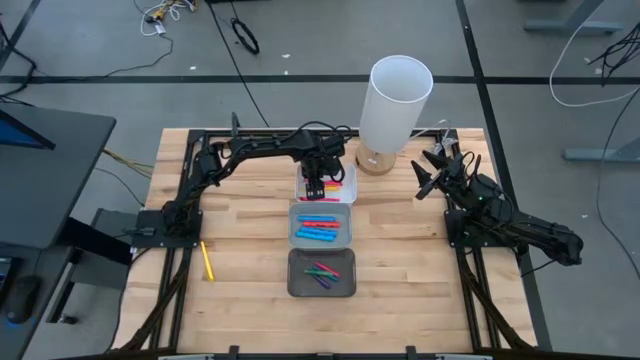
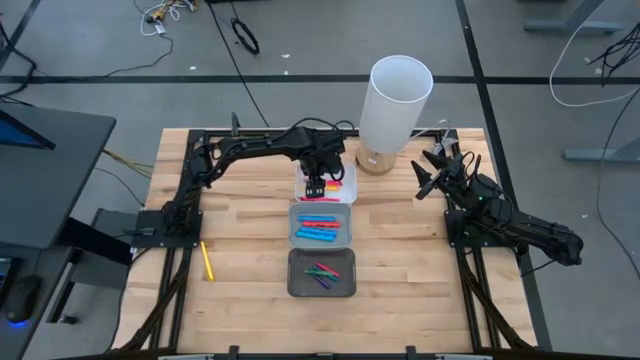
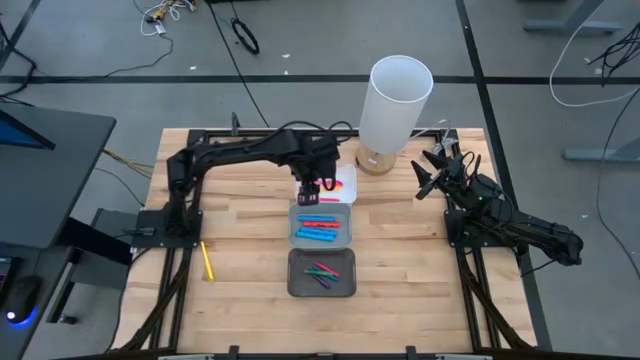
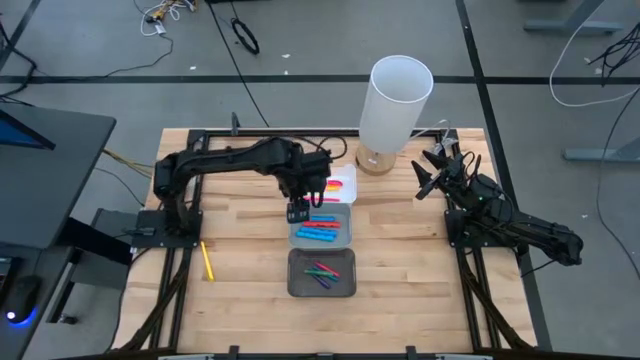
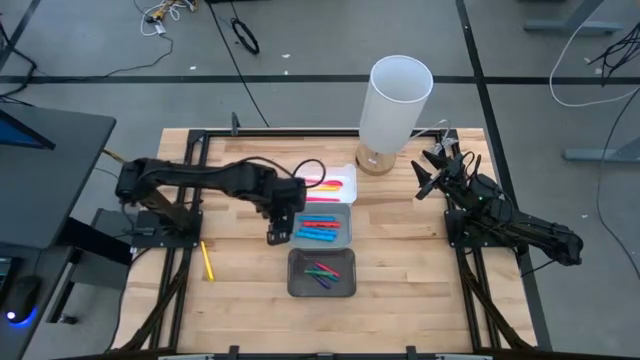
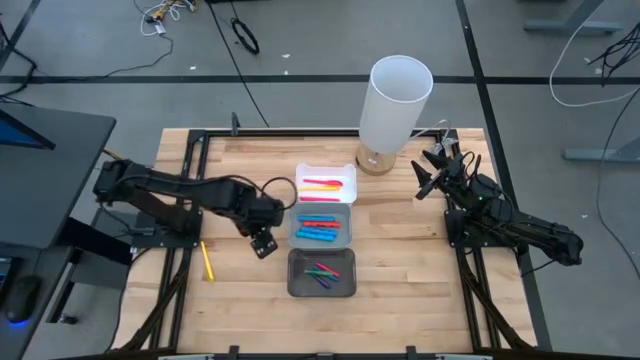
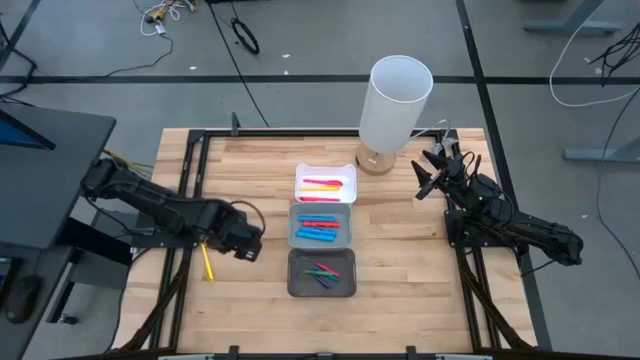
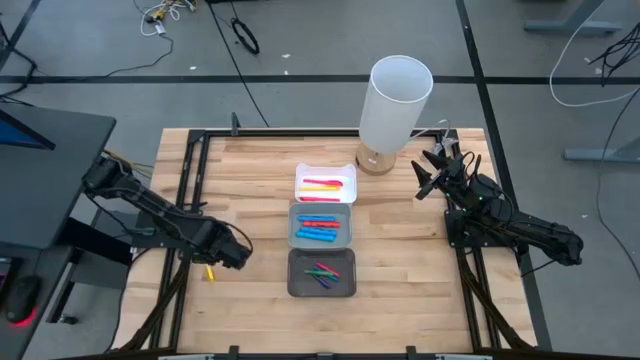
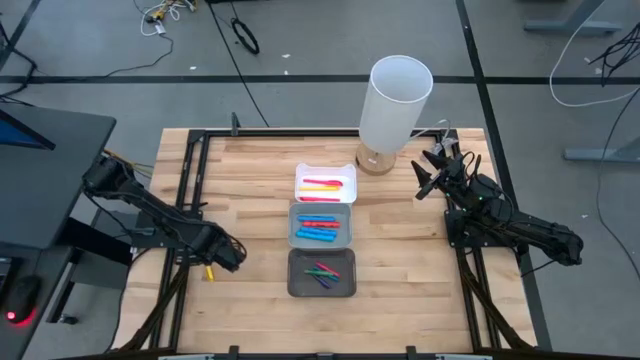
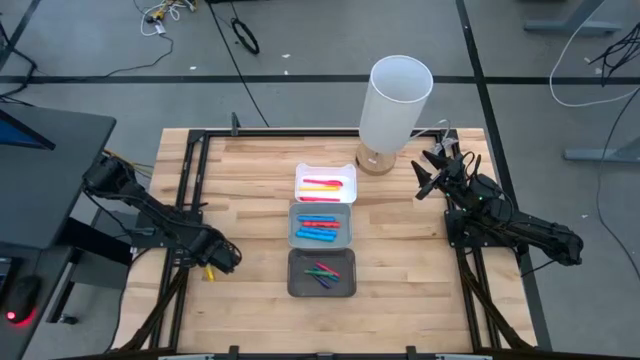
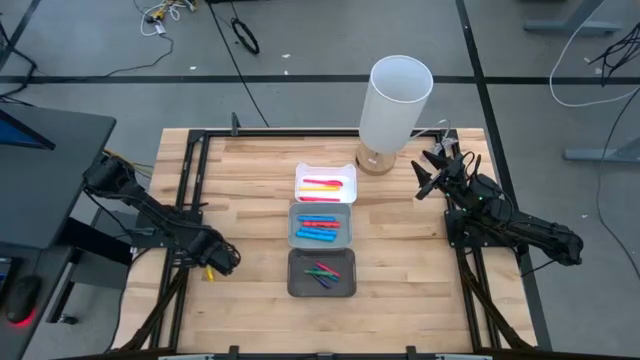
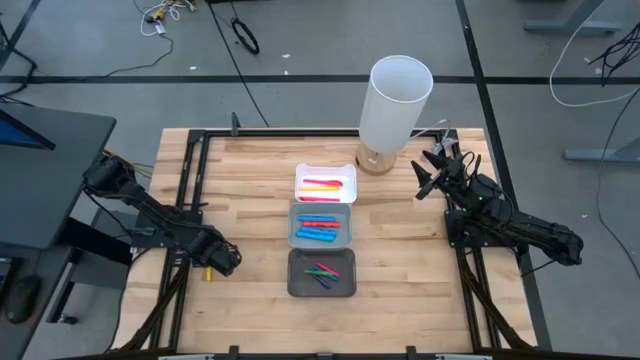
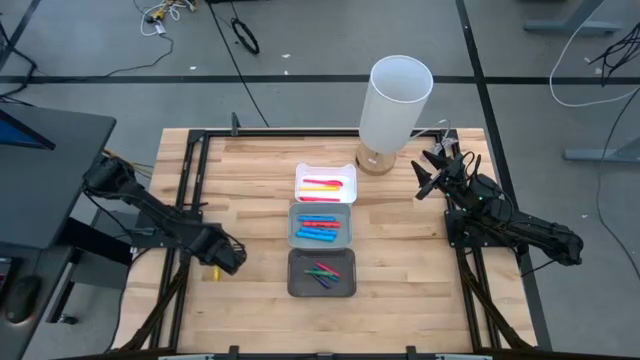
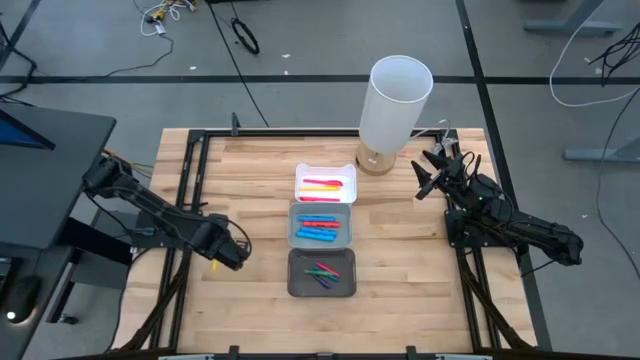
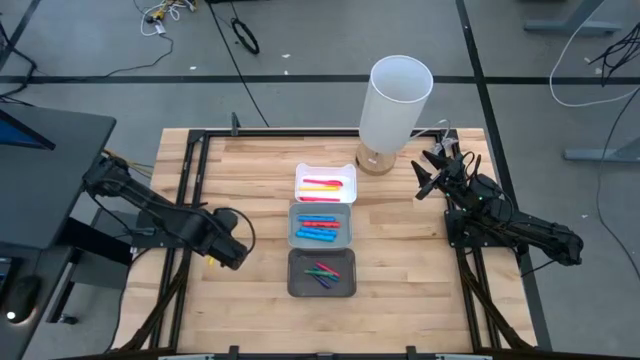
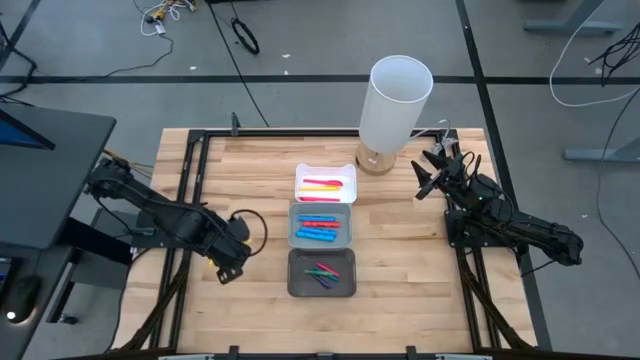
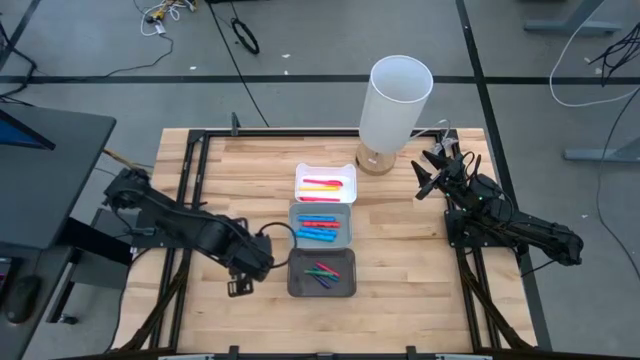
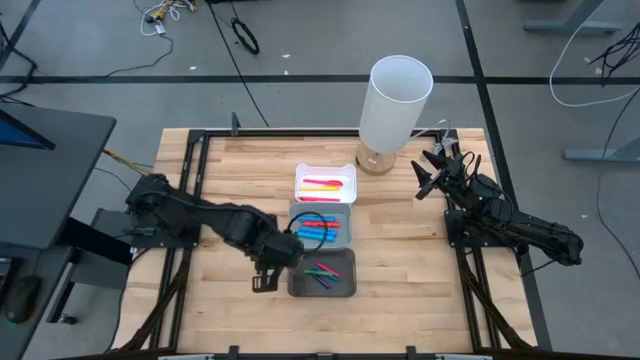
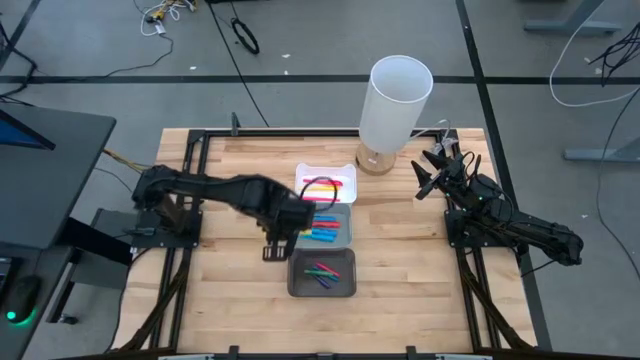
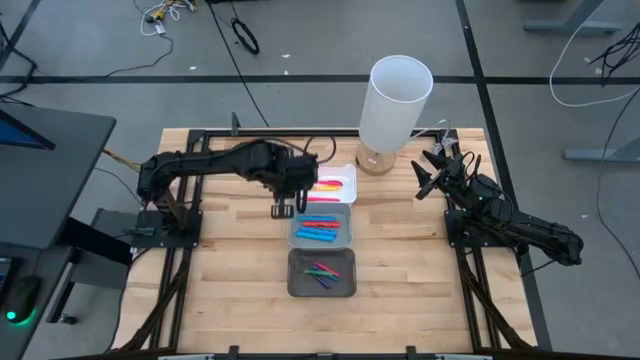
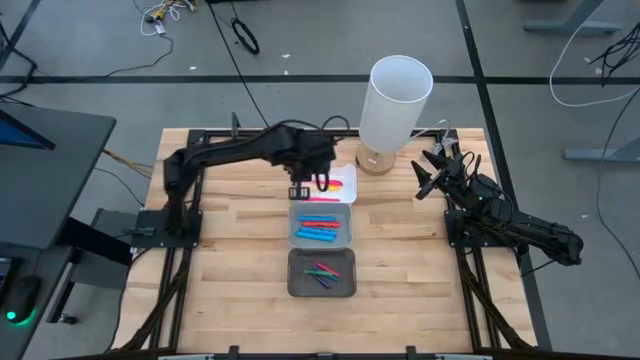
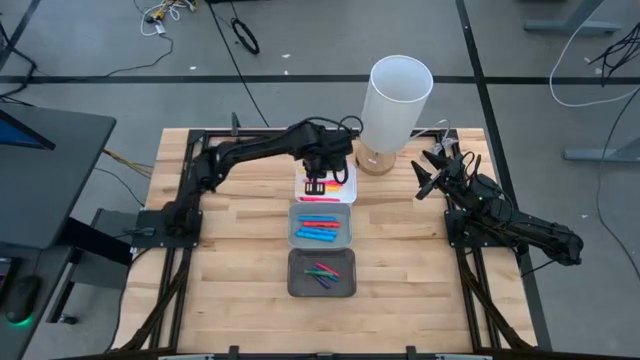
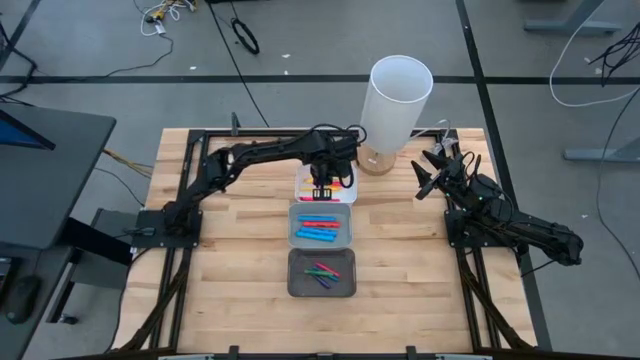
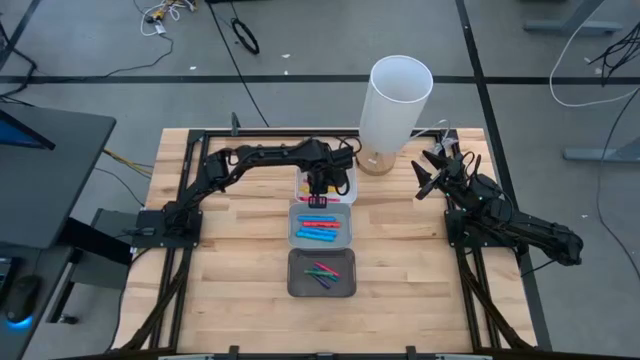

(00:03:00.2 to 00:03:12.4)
Task: Pick & Place Markers
Put the yellow marker pen into the white bin

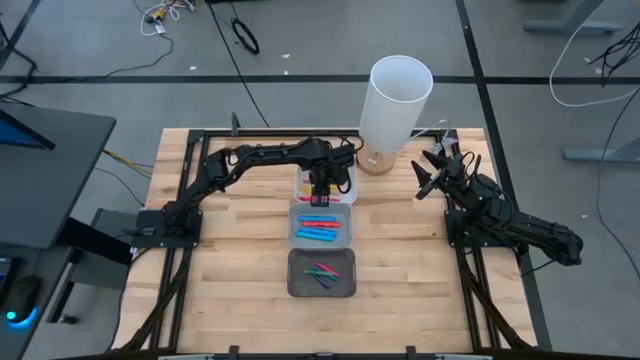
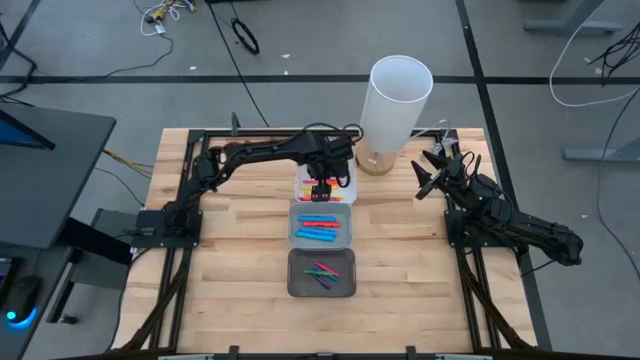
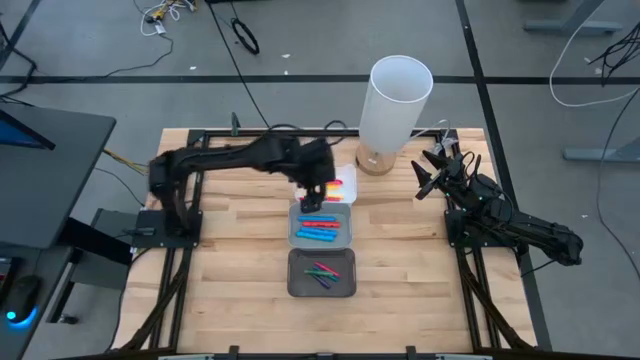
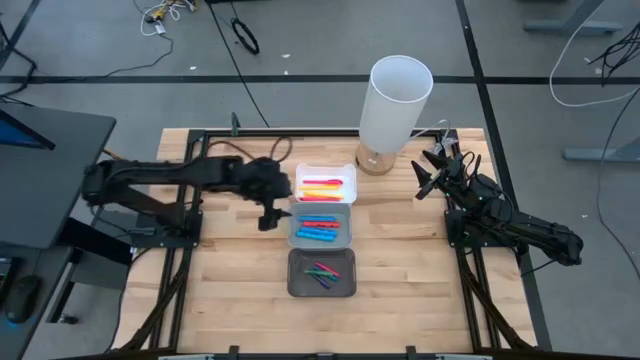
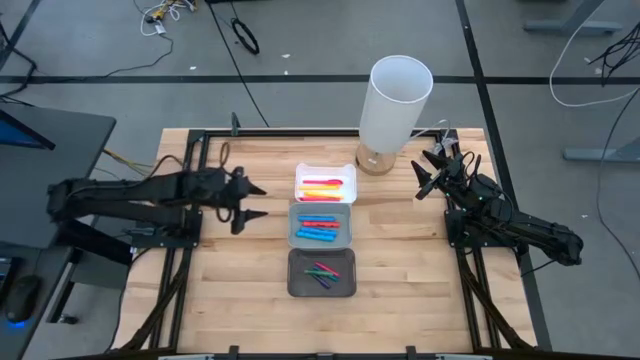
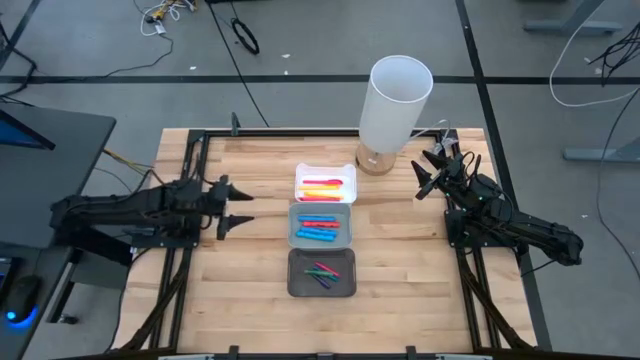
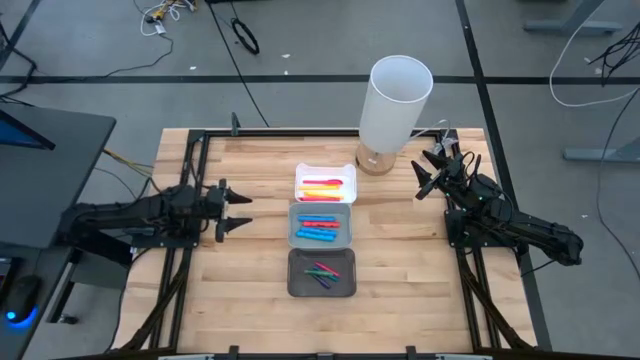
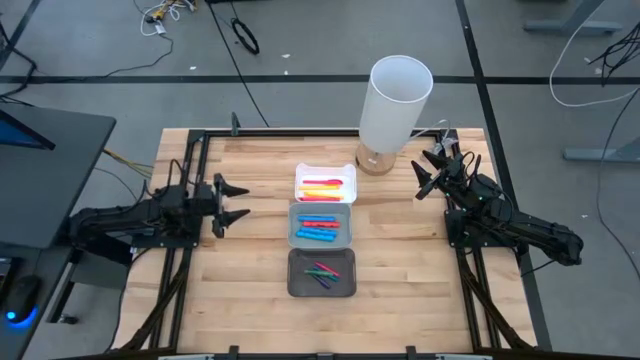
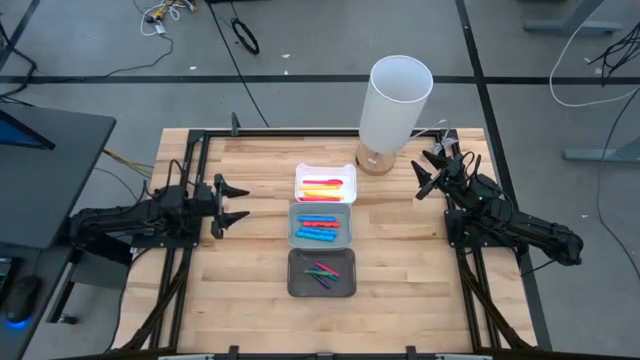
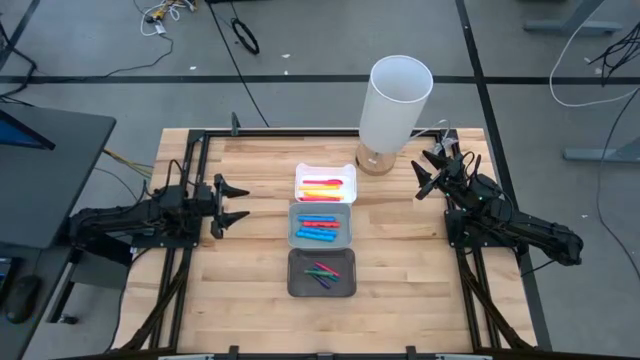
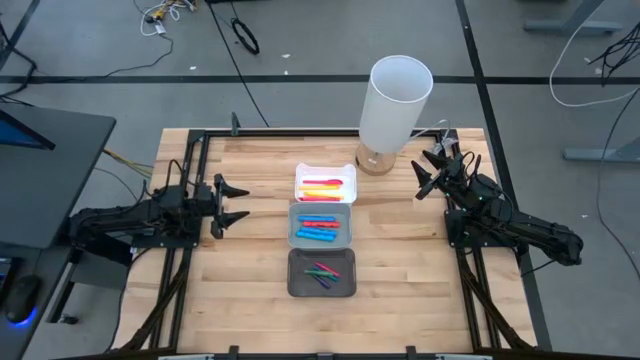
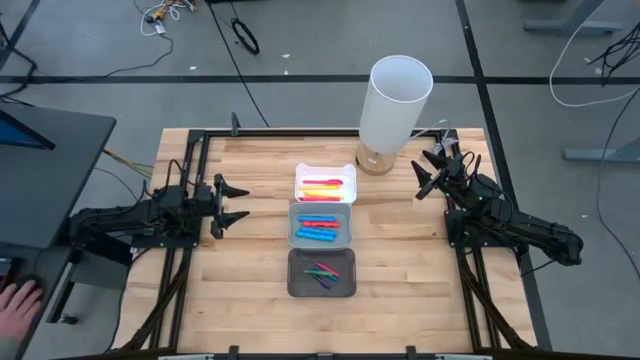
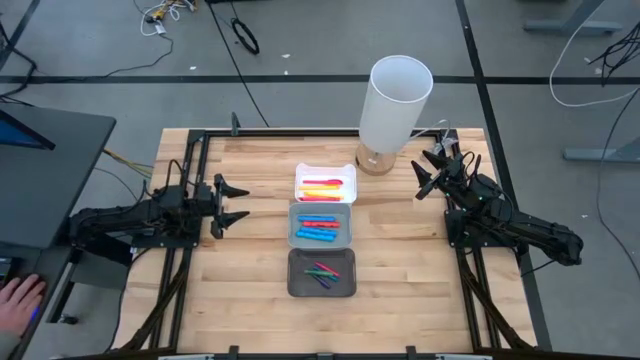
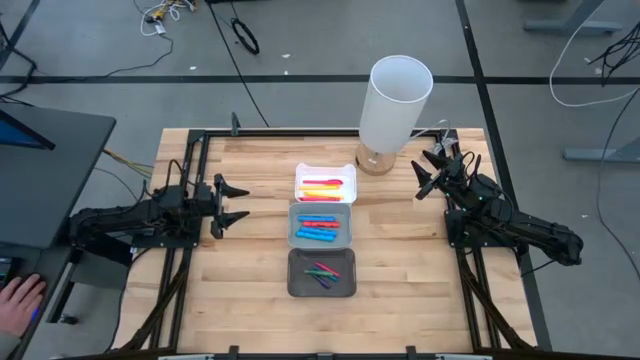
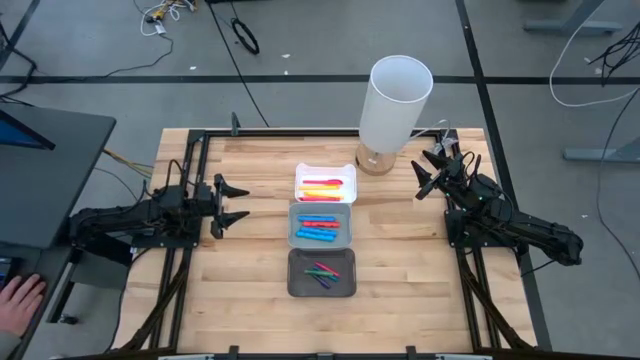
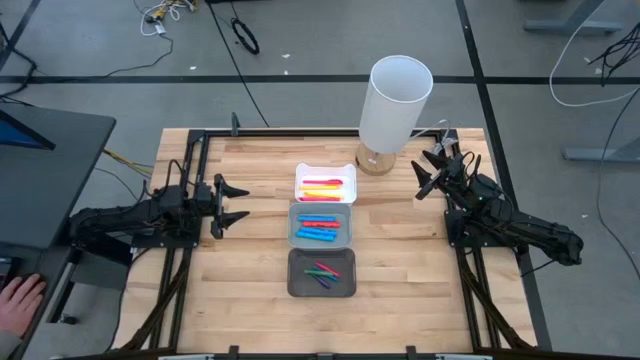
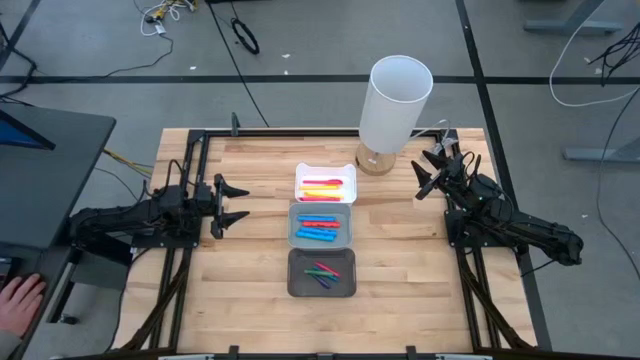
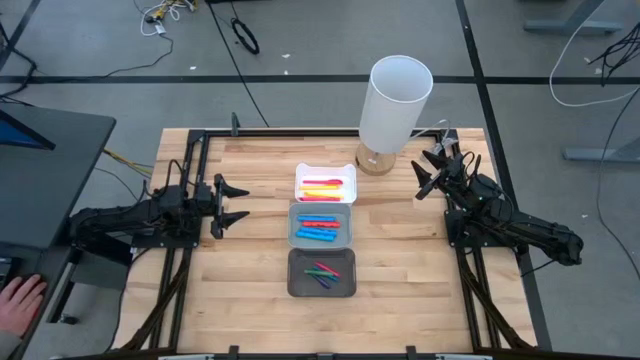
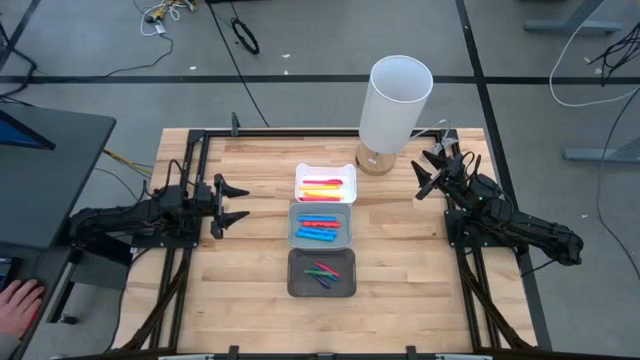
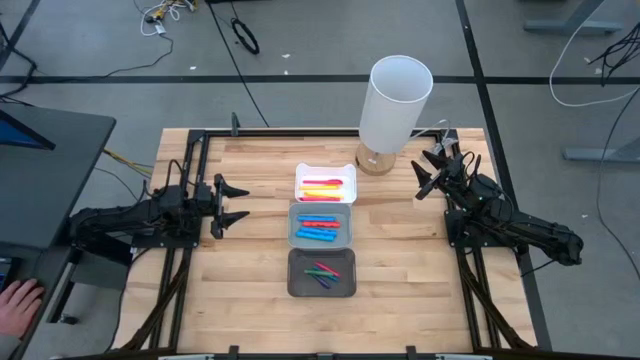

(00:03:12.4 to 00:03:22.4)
Return to Home Position
